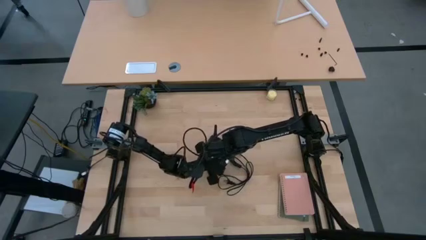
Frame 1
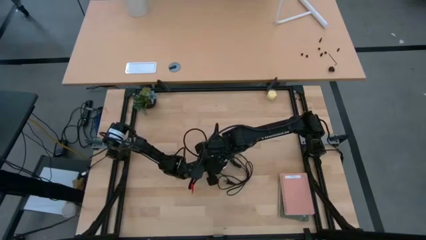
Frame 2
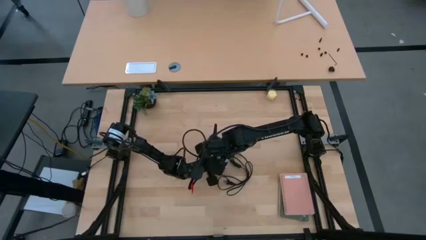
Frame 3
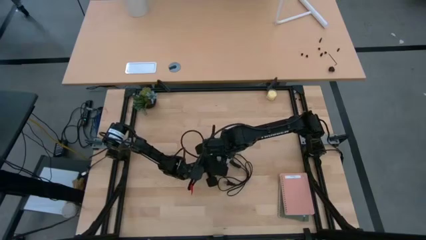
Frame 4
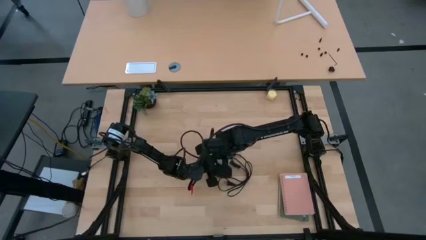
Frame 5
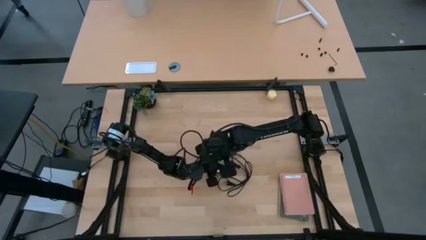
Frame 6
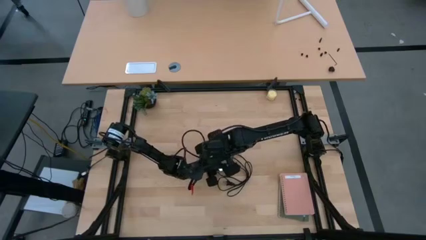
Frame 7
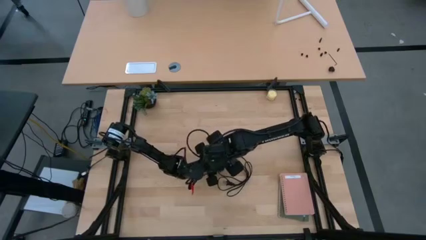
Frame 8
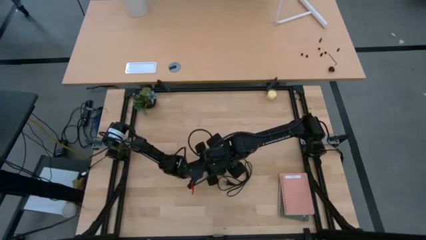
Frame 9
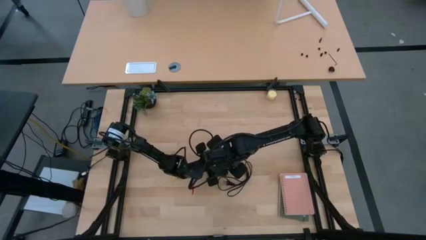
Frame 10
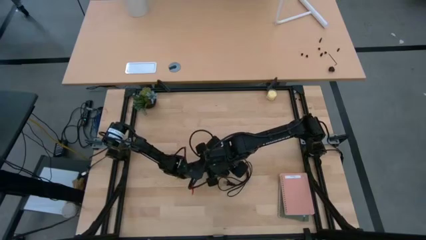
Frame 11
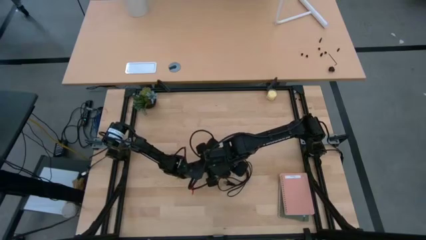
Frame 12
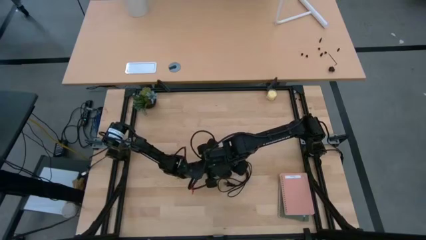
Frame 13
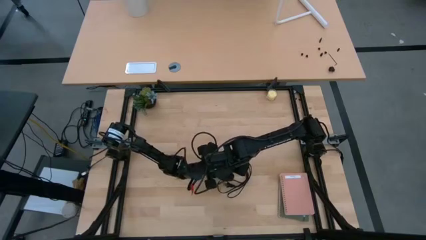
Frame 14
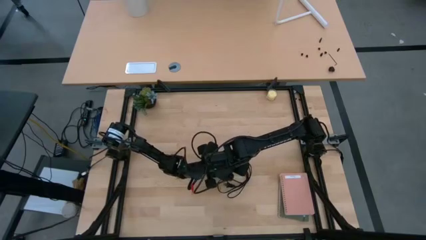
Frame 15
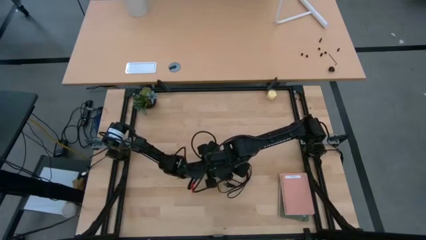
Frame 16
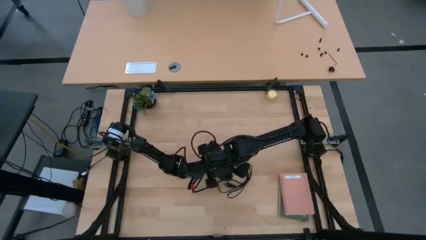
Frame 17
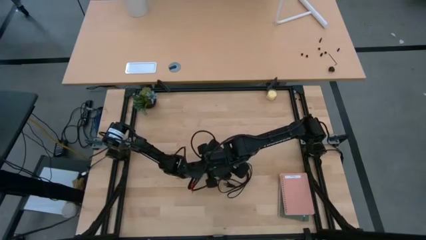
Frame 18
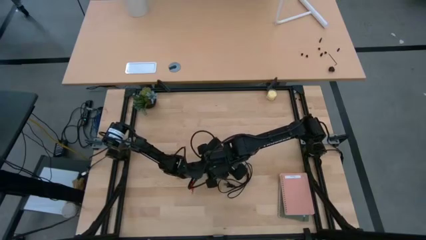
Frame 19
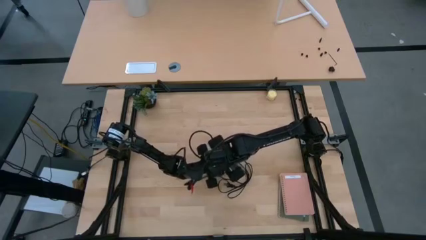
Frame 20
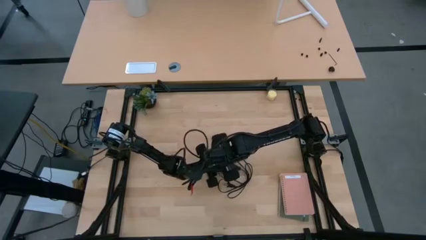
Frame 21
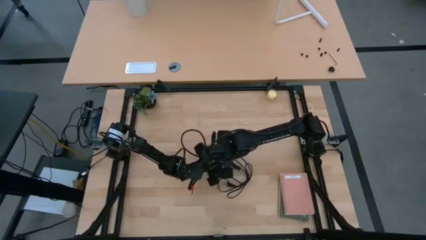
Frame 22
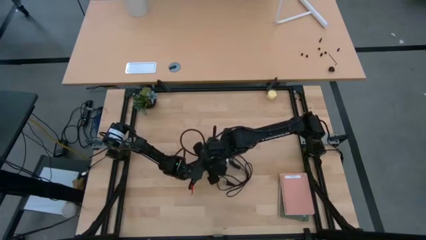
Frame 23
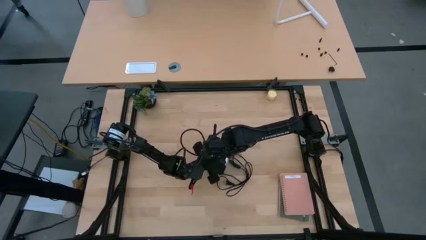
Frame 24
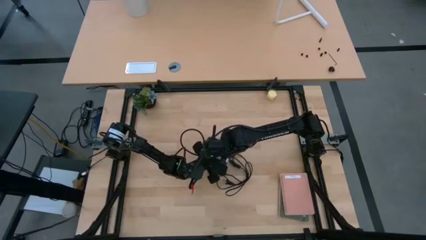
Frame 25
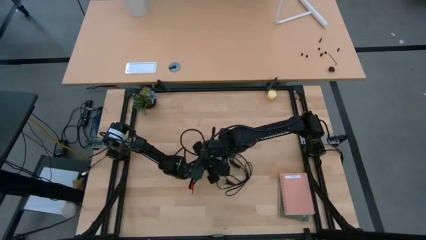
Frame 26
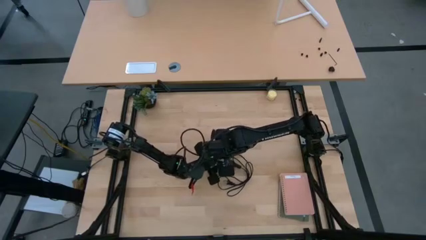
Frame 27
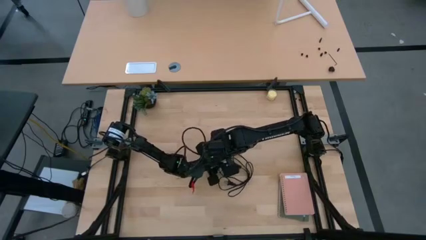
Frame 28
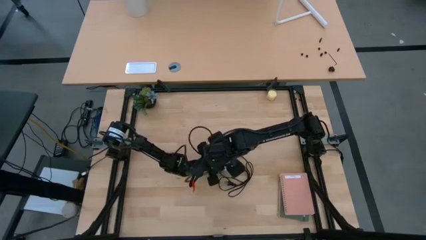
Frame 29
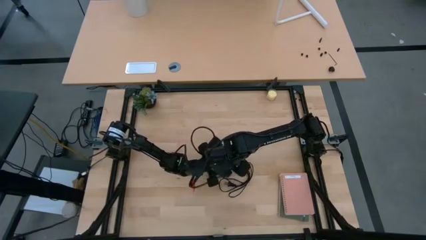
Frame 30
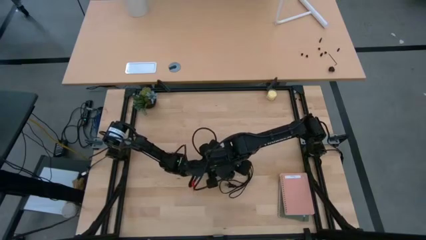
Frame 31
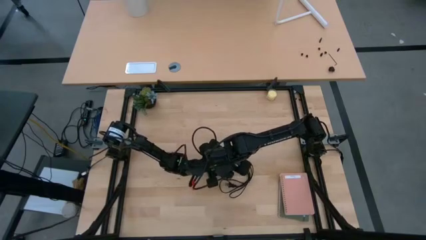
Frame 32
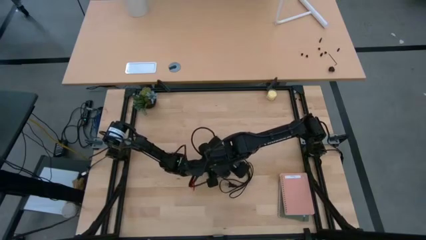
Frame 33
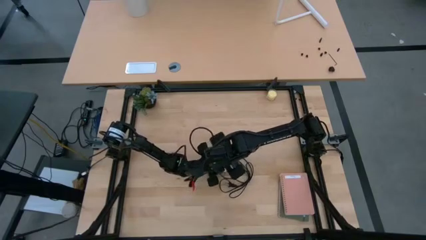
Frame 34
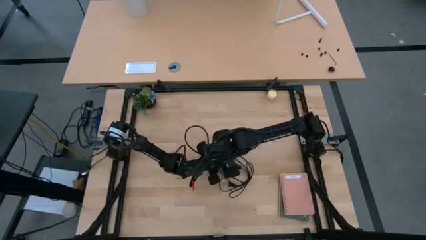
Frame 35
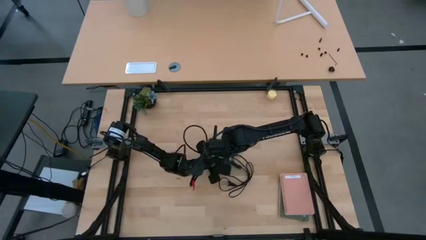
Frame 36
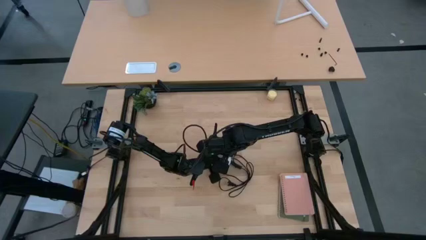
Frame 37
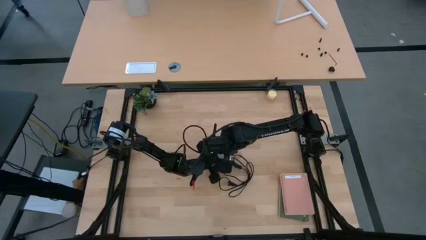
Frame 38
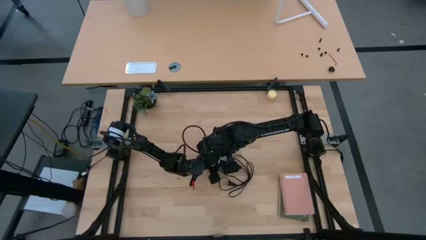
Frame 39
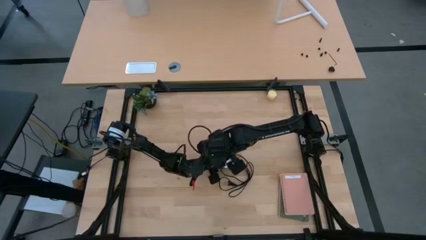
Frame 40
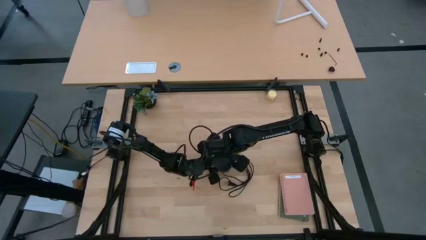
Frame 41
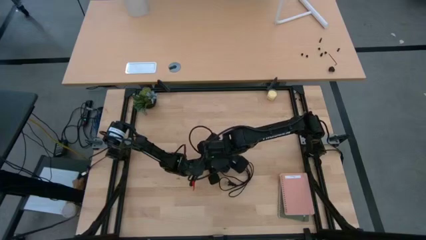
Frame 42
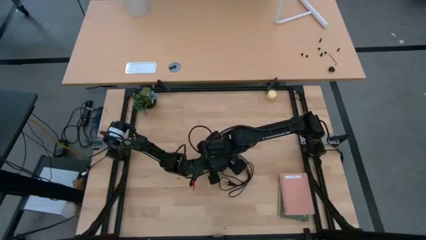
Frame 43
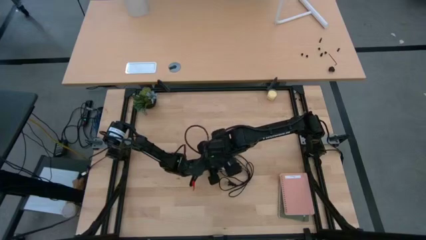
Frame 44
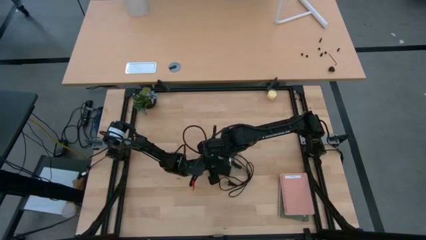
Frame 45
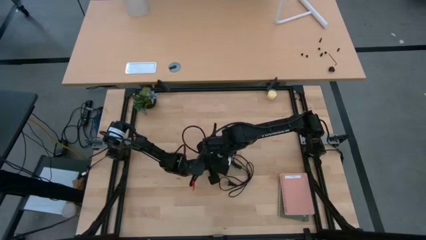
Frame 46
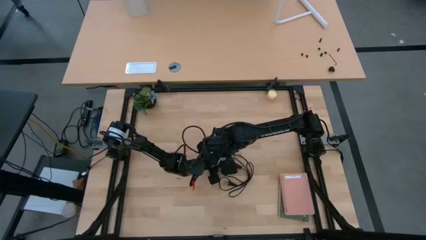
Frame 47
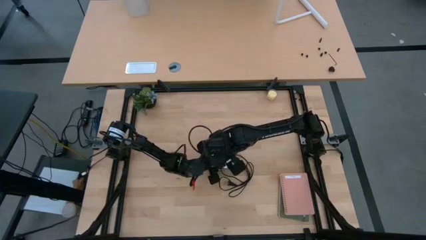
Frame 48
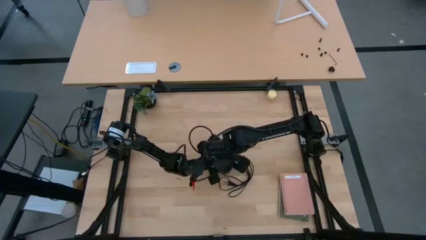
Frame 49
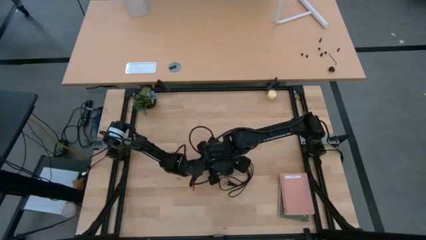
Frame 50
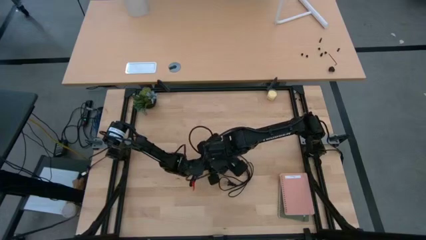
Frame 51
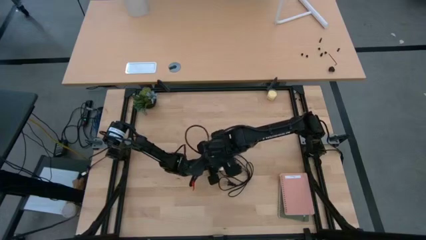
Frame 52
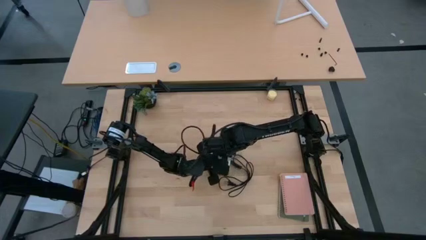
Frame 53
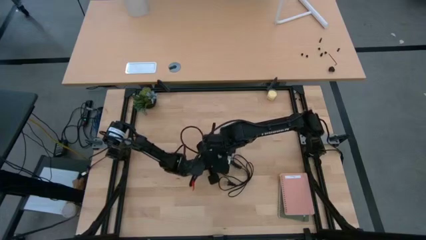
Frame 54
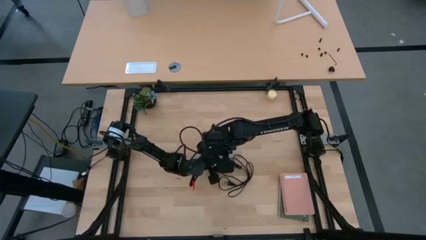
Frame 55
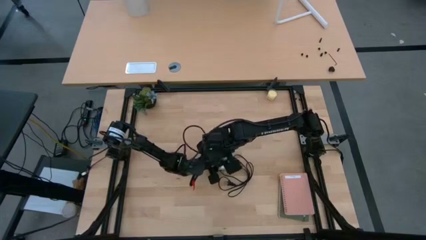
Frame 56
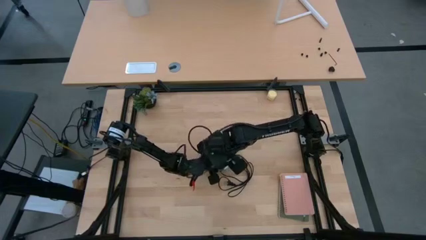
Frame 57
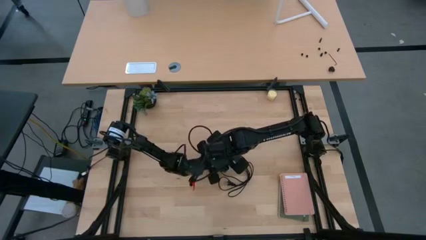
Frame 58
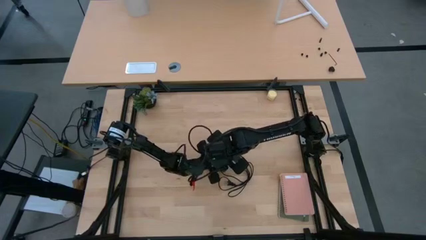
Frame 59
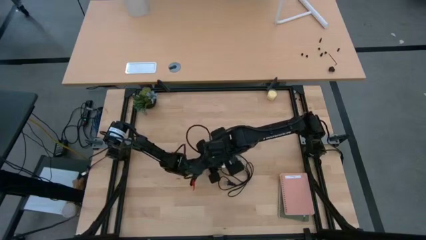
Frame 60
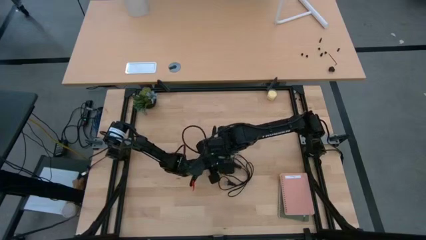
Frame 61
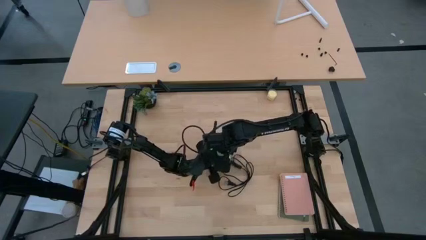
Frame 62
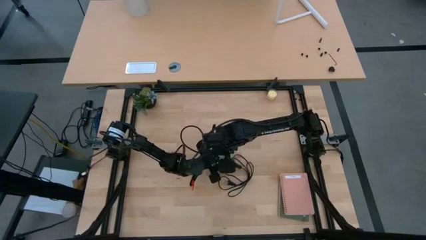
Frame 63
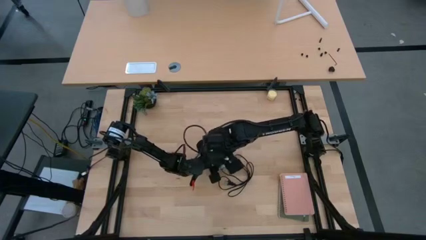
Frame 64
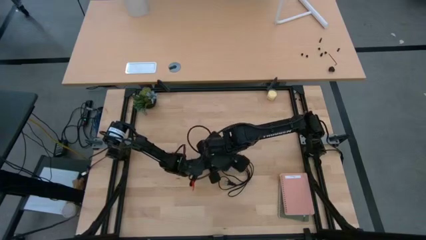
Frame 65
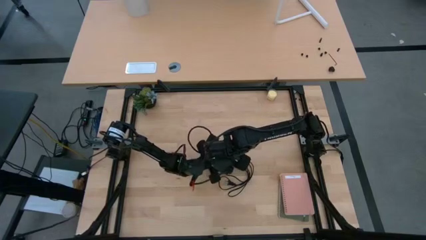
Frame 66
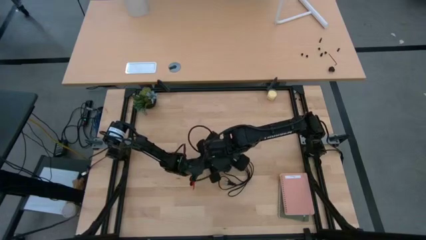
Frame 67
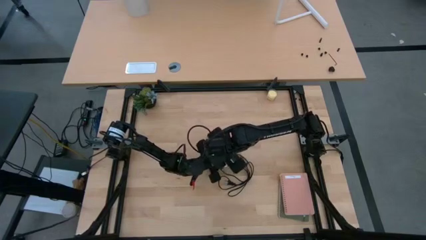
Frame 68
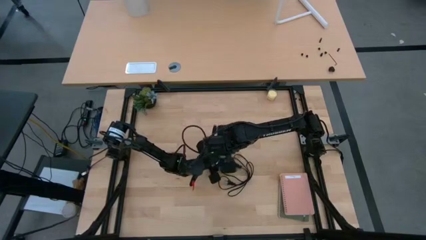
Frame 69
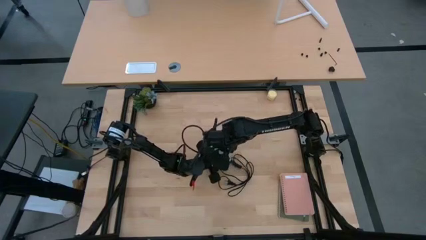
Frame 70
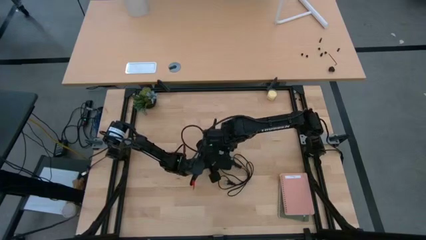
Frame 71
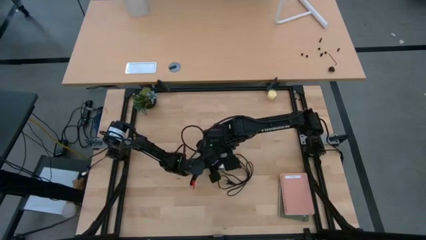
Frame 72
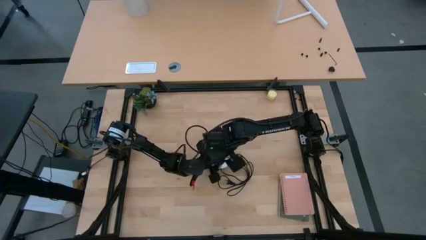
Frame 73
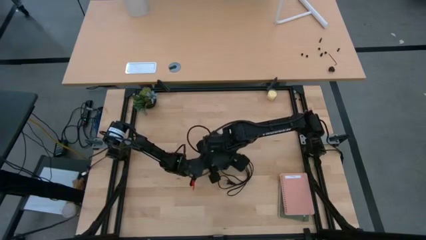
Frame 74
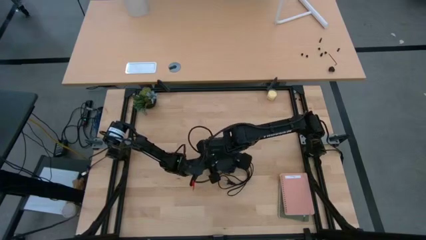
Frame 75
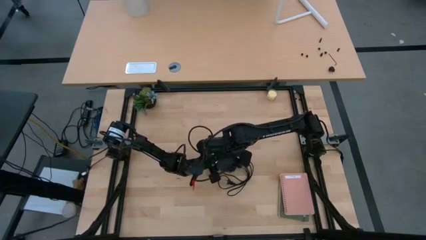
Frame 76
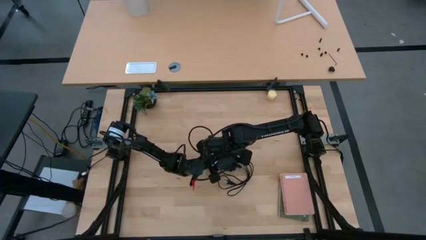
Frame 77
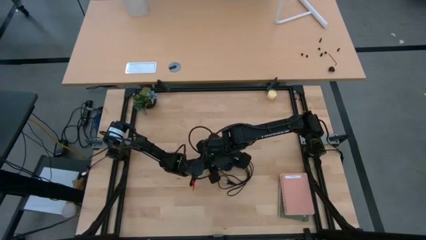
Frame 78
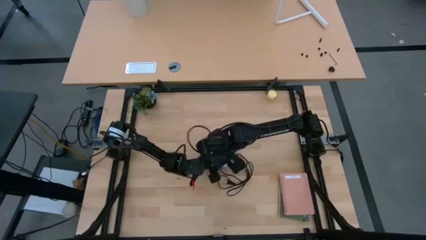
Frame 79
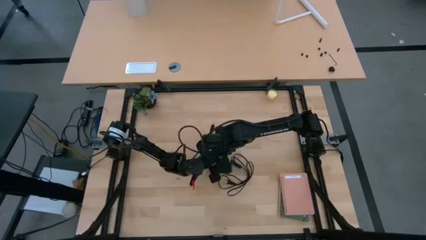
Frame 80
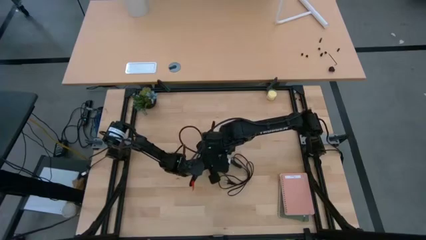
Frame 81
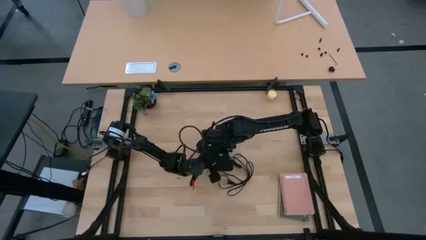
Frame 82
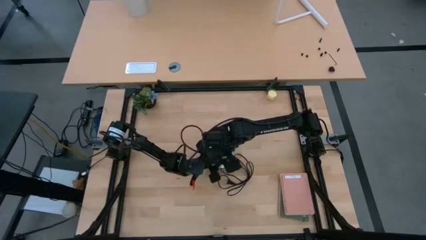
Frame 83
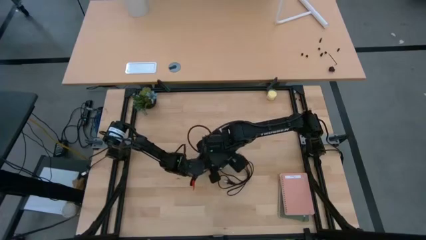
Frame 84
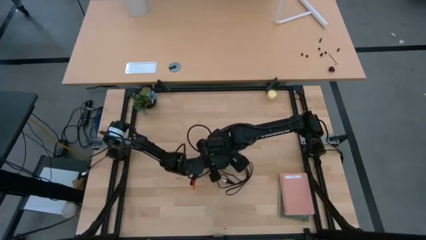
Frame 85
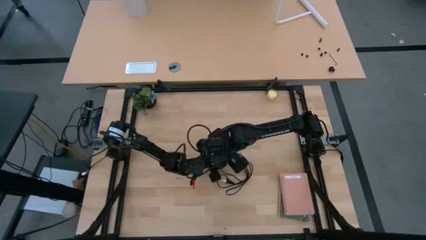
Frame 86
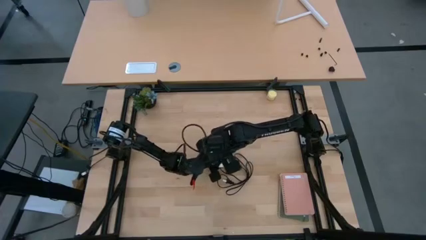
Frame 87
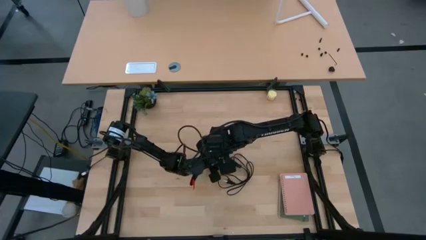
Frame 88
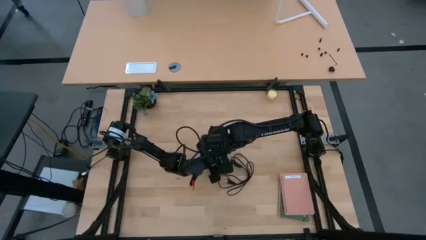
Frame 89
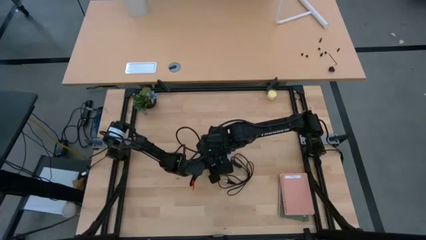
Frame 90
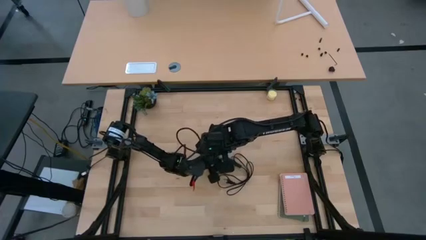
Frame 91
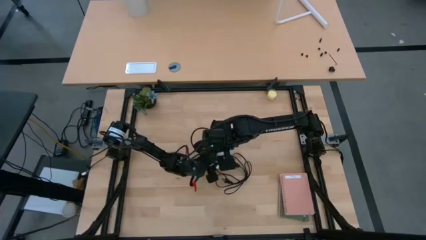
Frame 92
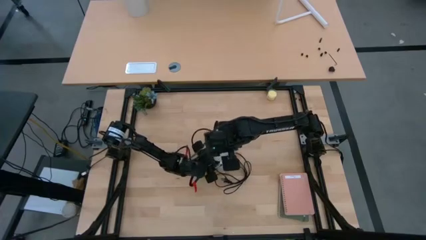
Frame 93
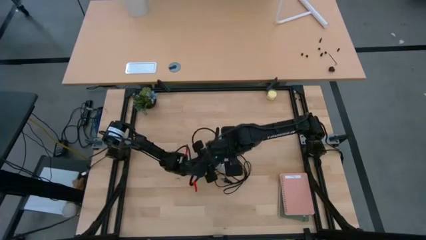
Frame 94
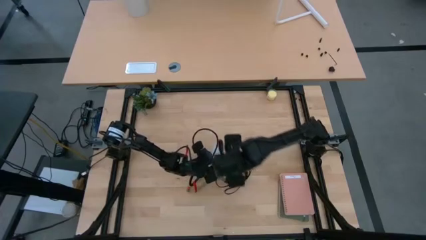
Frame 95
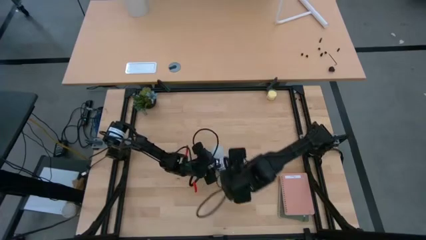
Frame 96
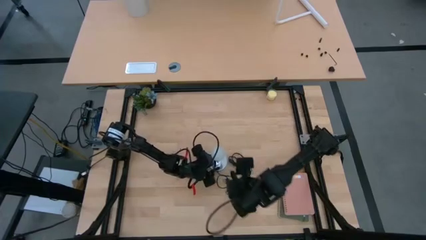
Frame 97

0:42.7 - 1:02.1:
Task: Screw lightbulb
Insert the light bulb into the lamp
